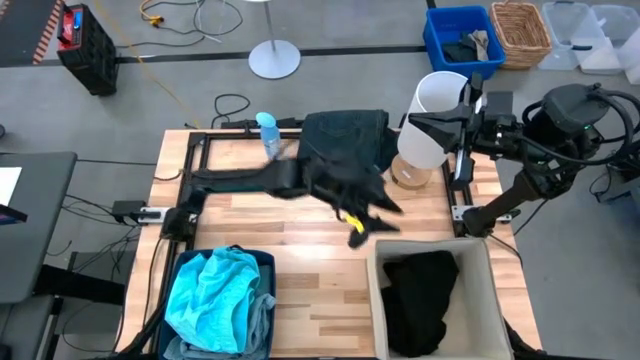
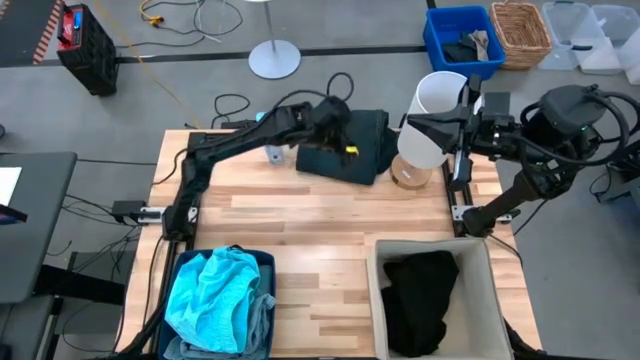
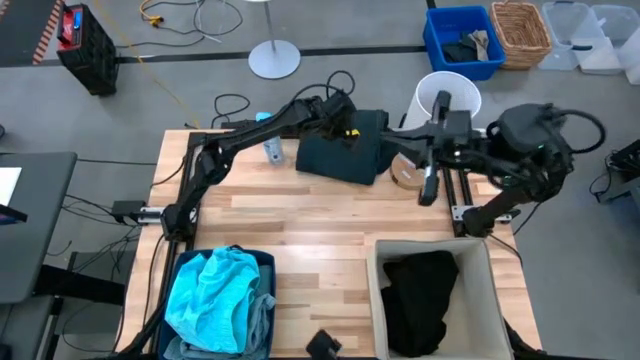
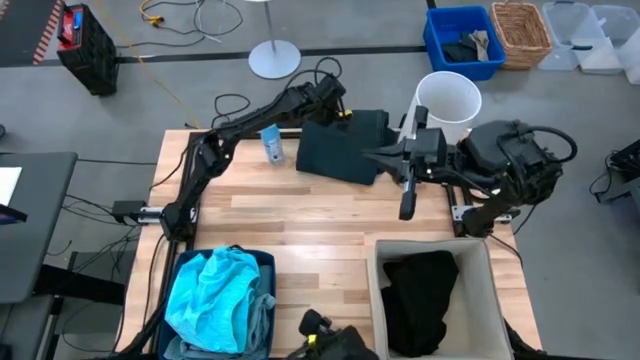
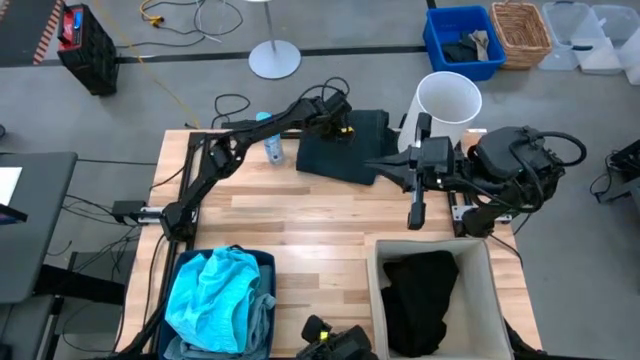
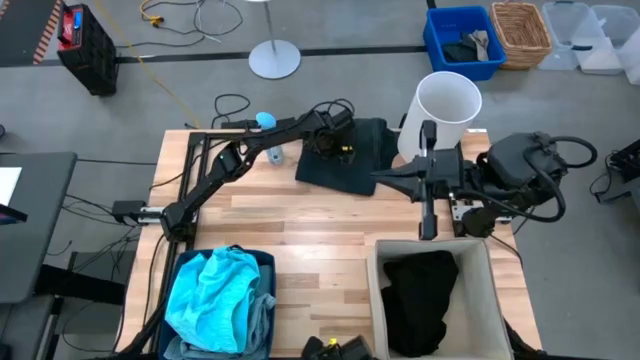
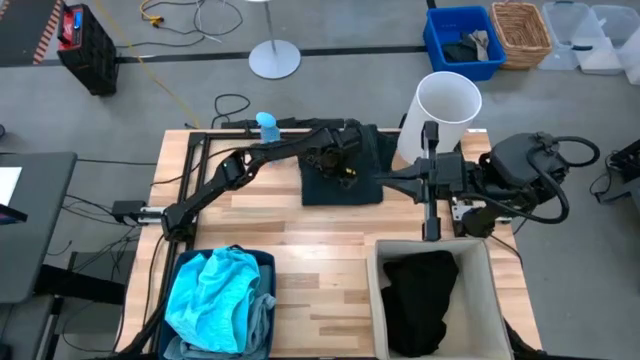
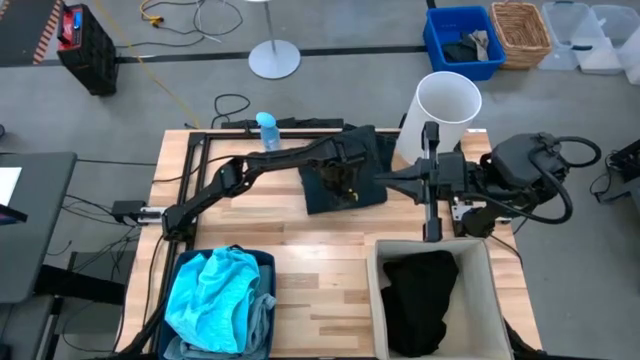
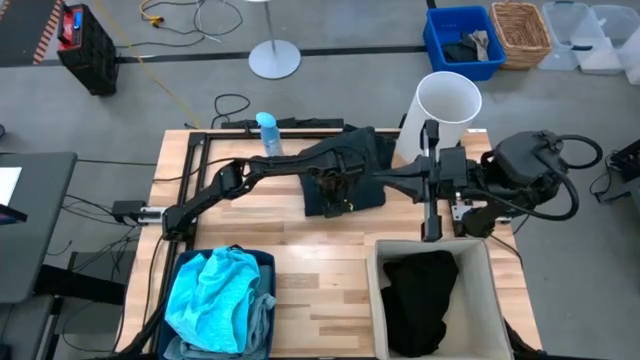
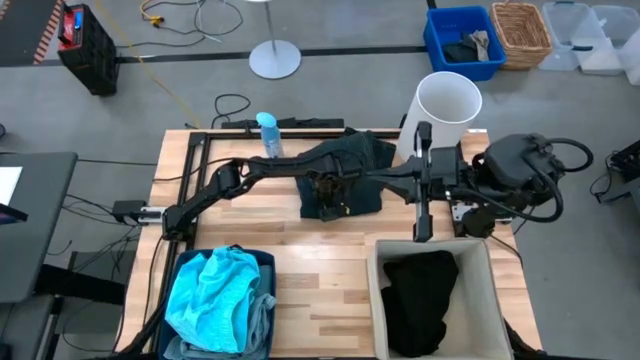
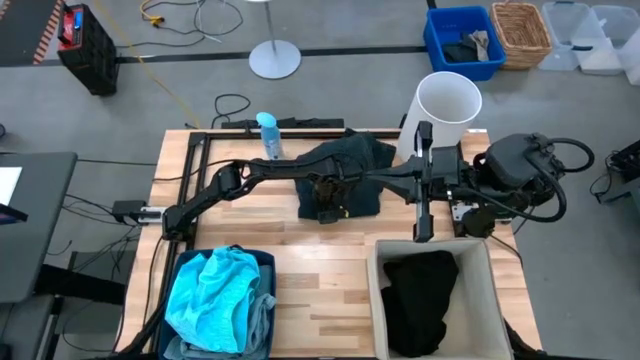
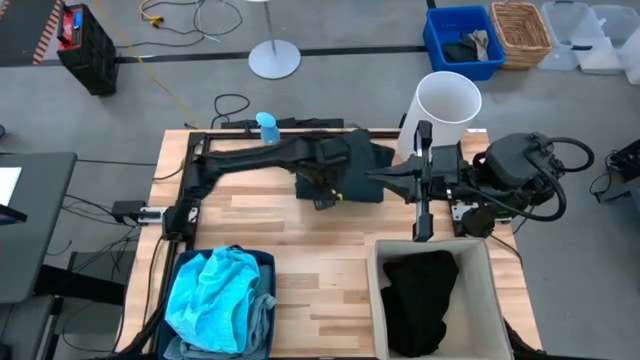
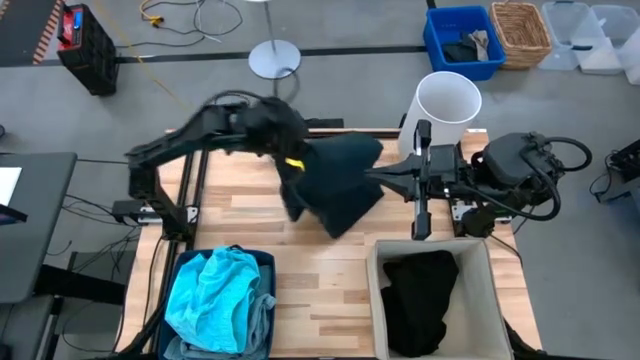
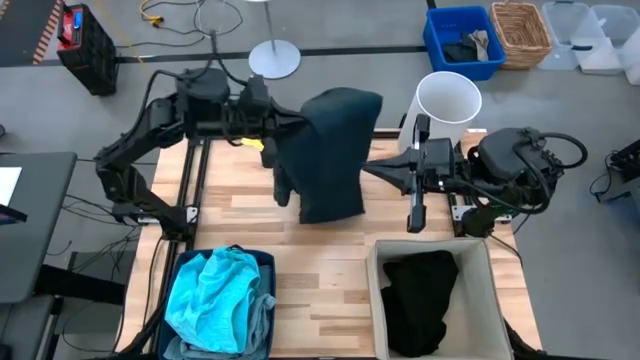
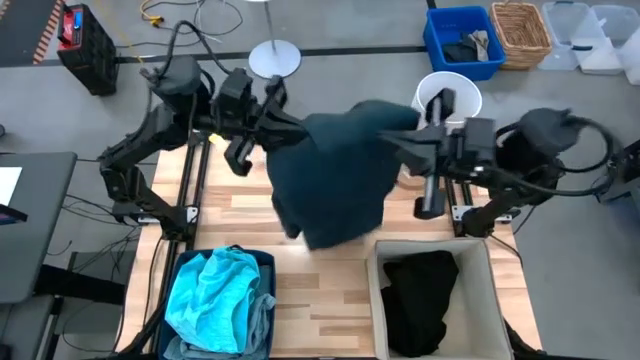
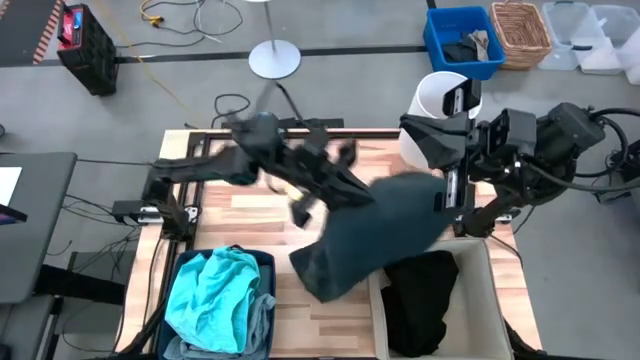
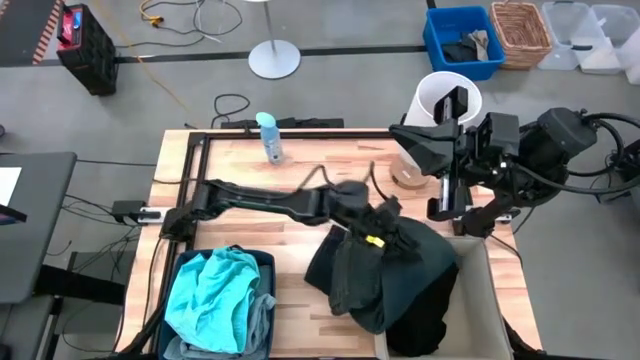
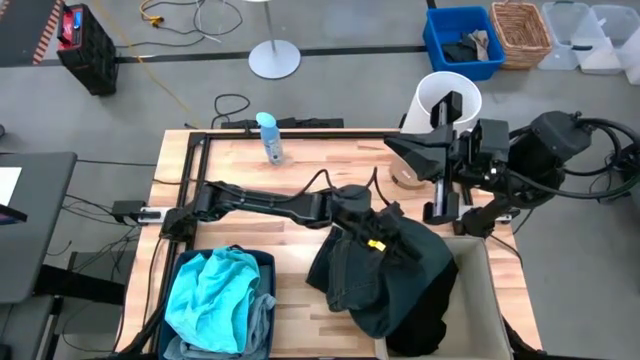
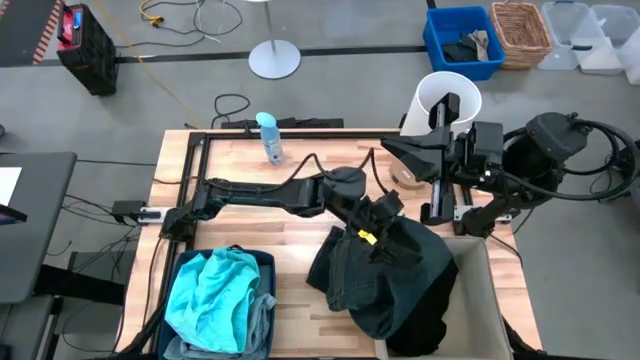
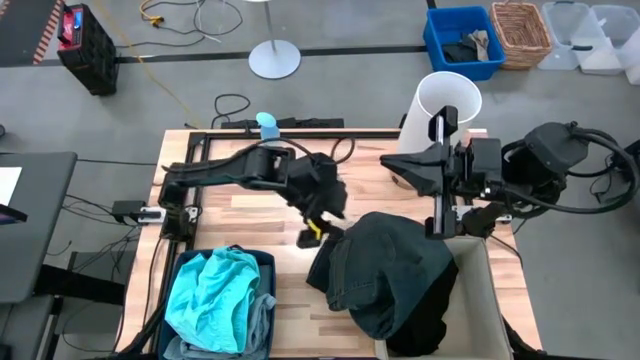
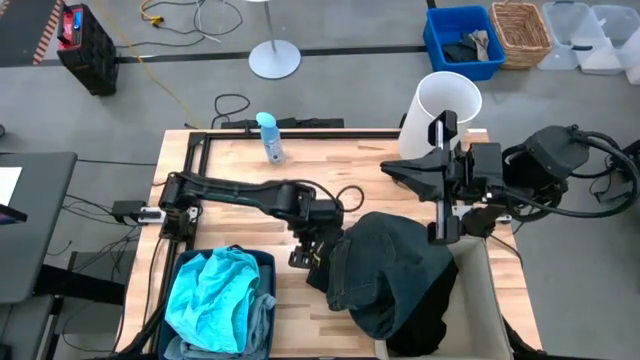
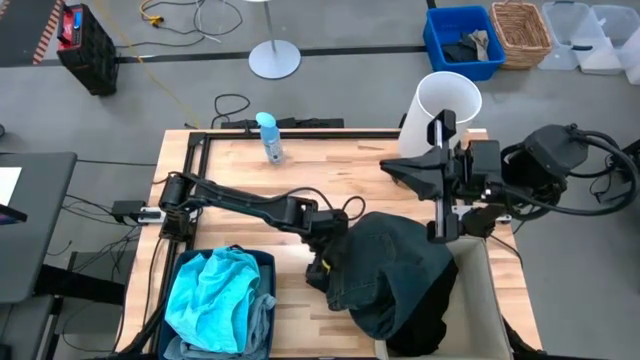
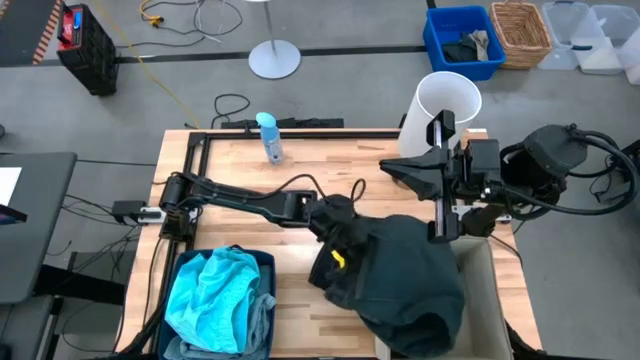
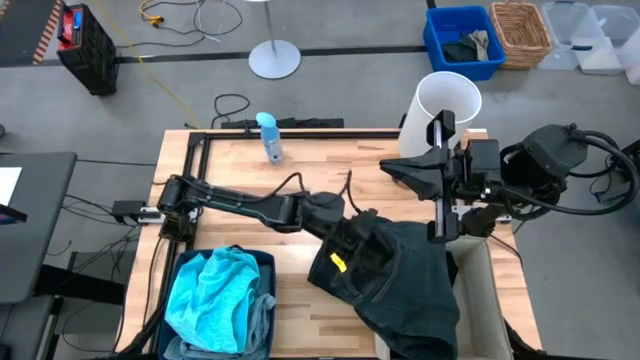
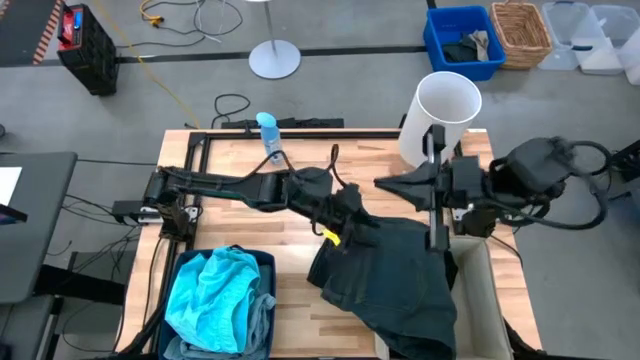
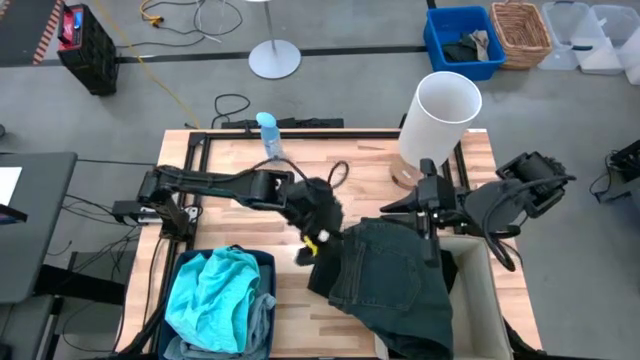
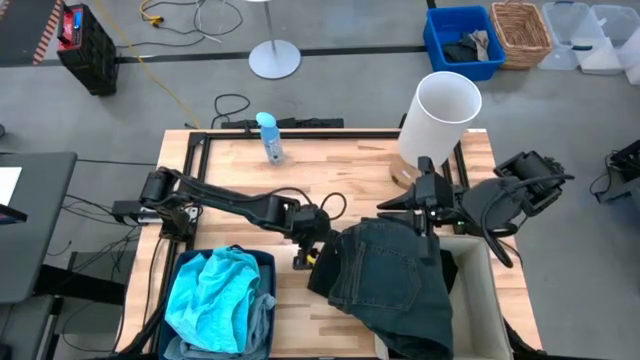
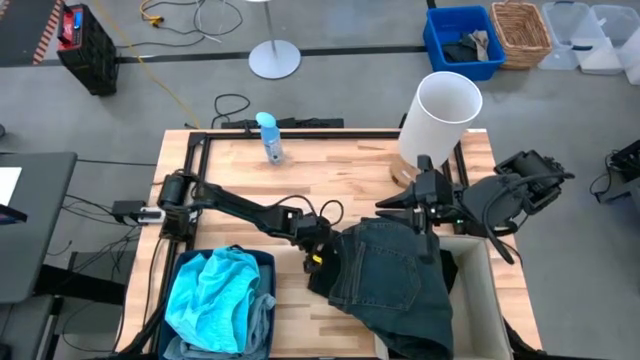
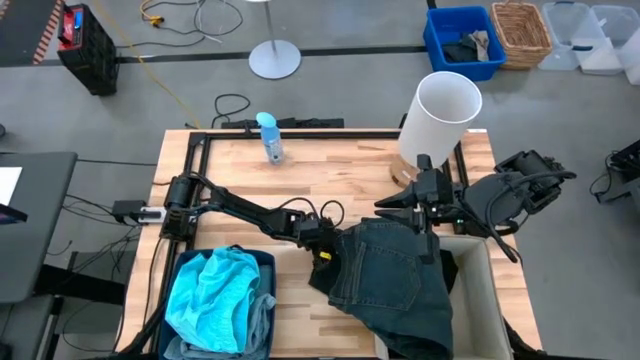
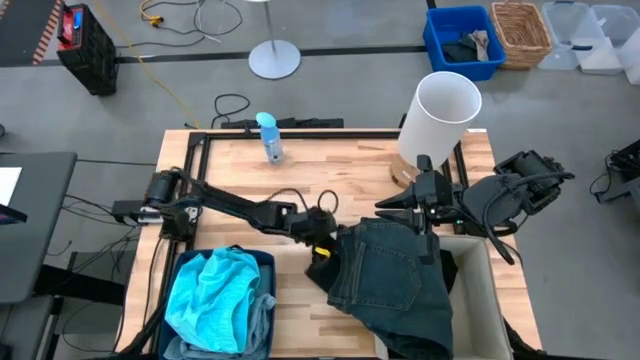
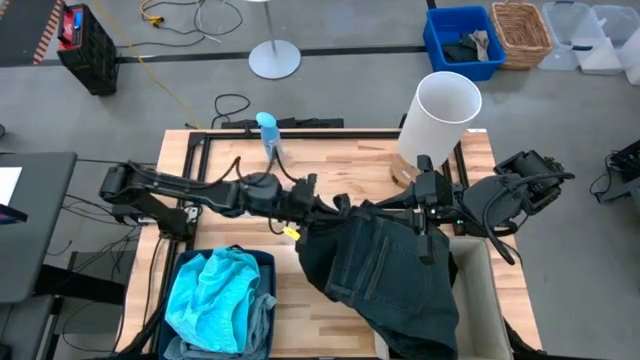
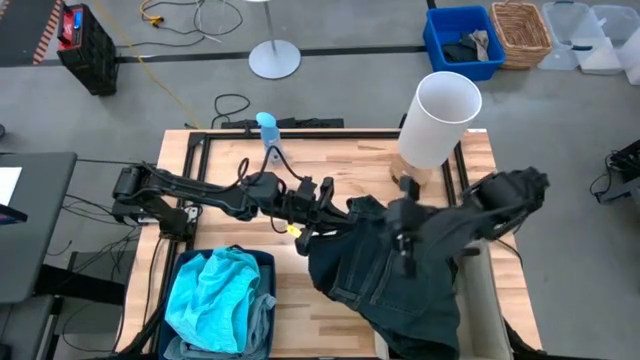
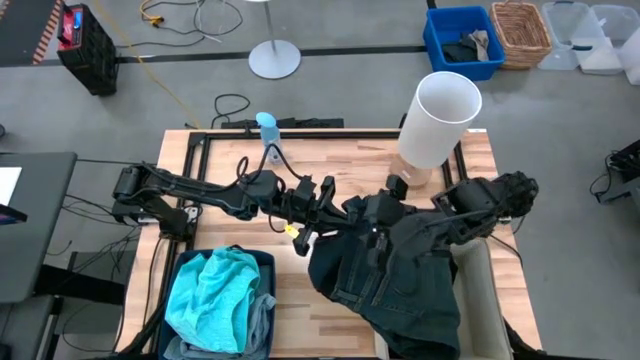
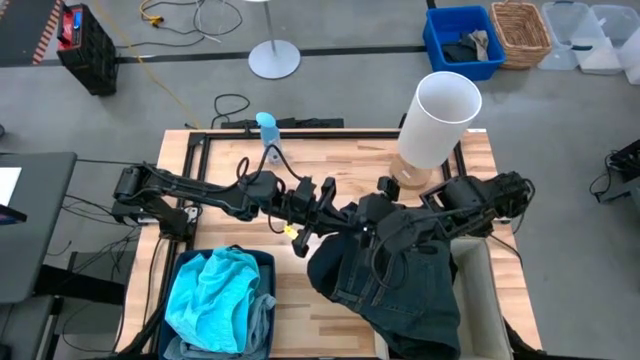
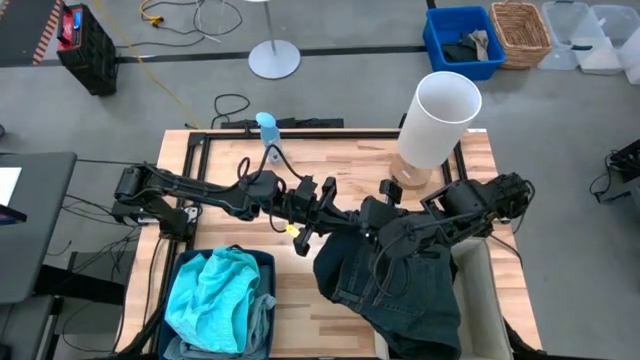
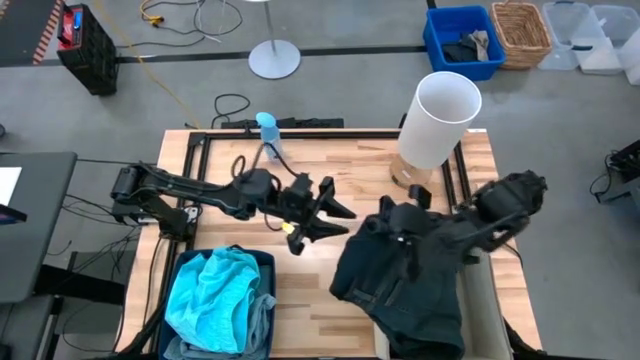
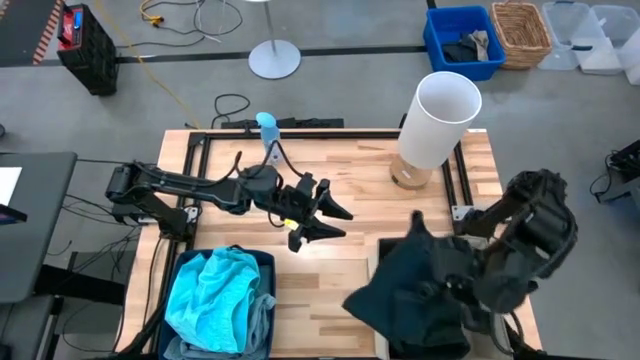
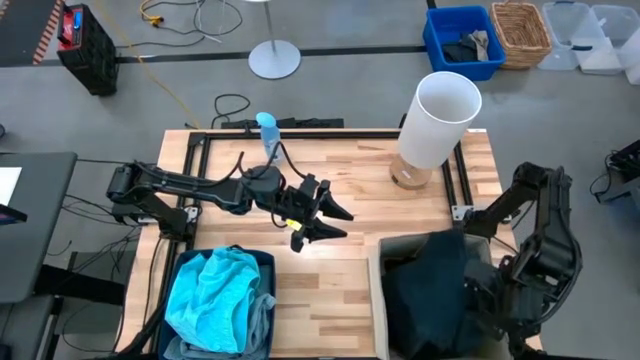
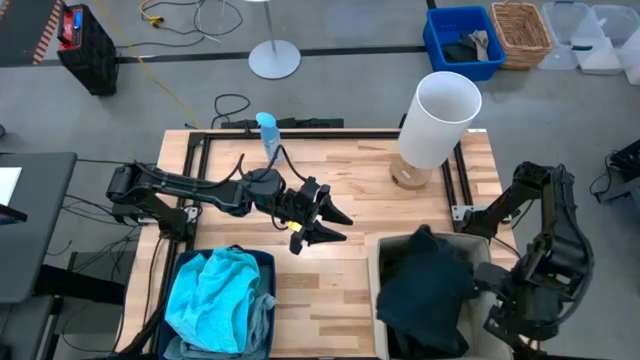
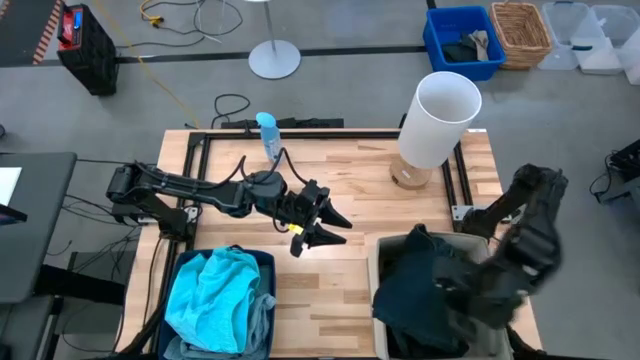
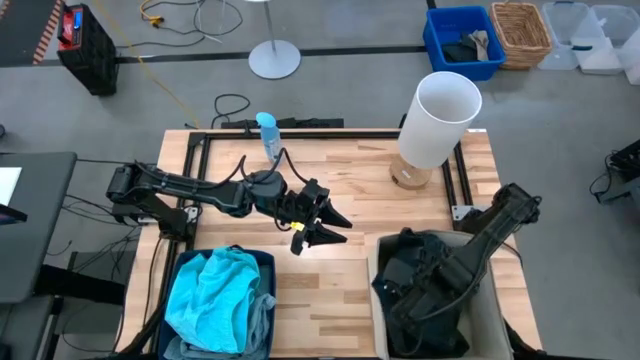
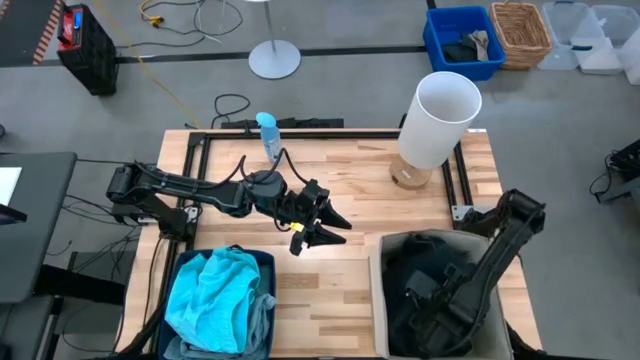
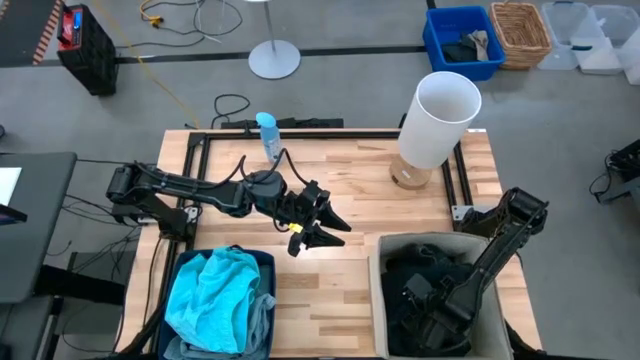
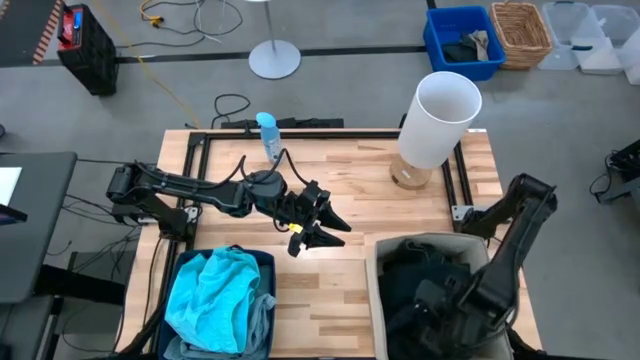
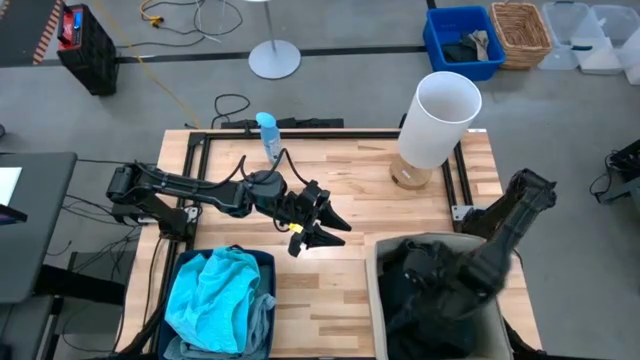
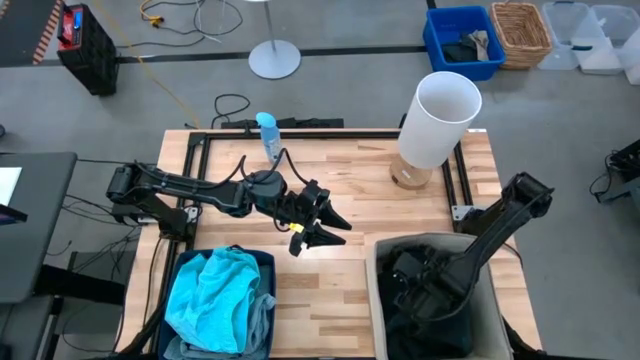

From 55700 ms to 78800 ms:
Task: Sort clothes
Put the dark blue jeans into the laundry organizer
